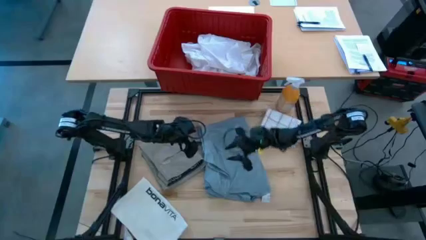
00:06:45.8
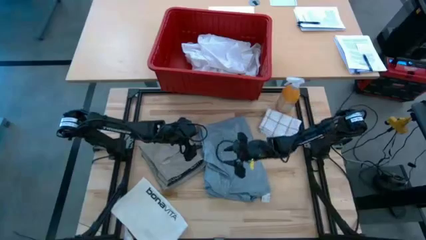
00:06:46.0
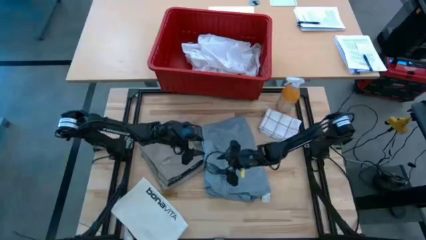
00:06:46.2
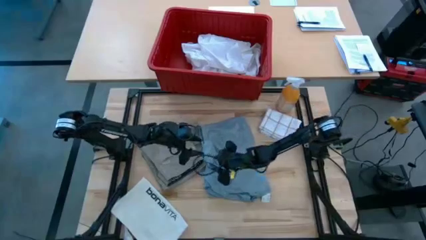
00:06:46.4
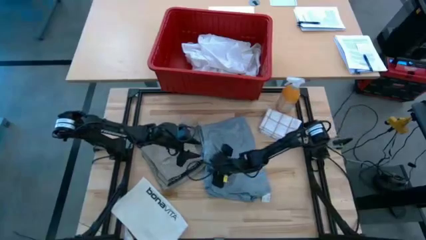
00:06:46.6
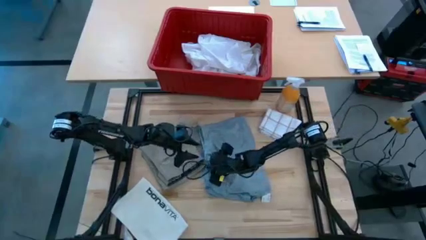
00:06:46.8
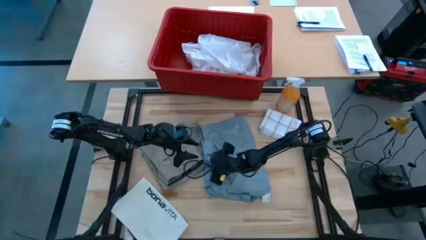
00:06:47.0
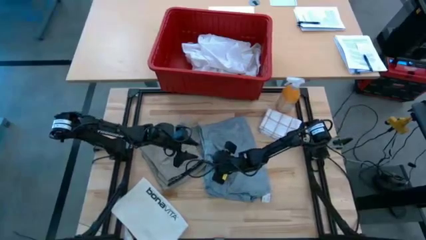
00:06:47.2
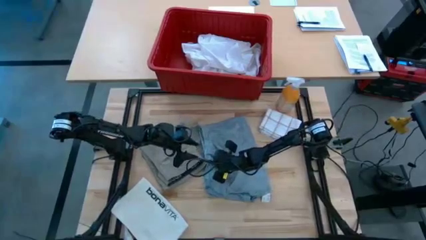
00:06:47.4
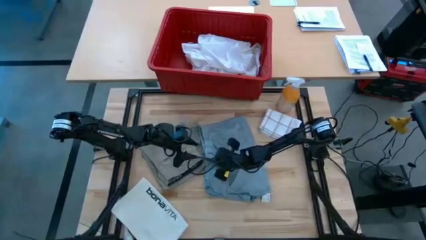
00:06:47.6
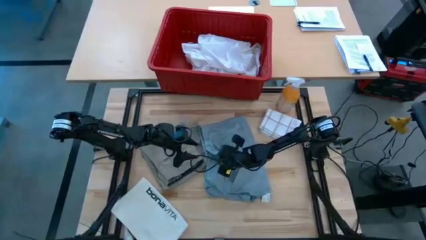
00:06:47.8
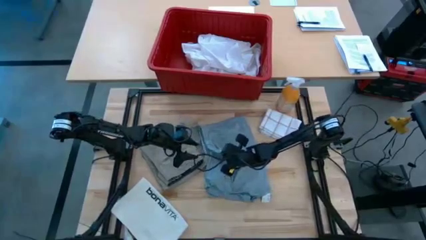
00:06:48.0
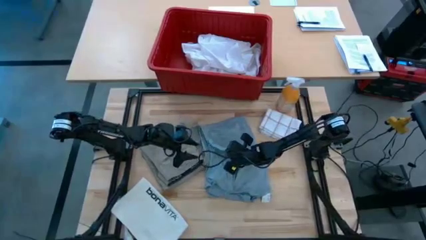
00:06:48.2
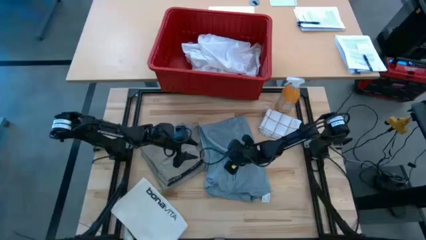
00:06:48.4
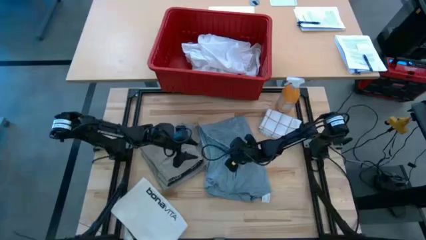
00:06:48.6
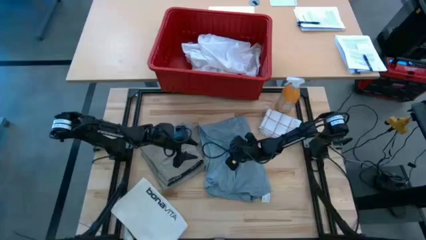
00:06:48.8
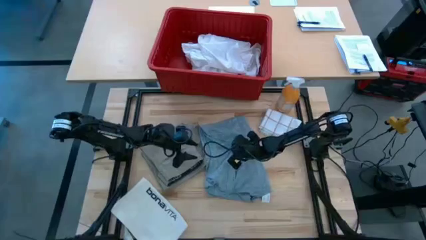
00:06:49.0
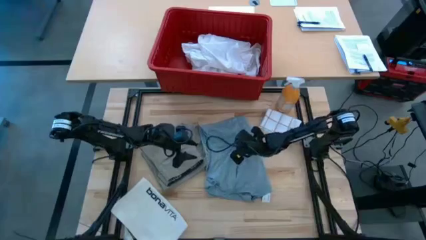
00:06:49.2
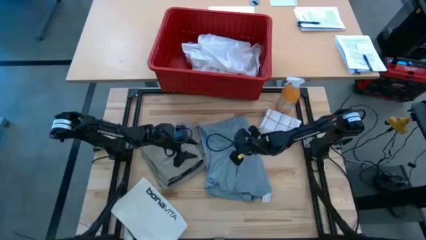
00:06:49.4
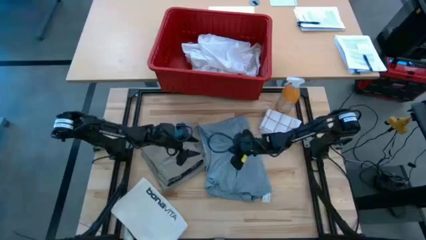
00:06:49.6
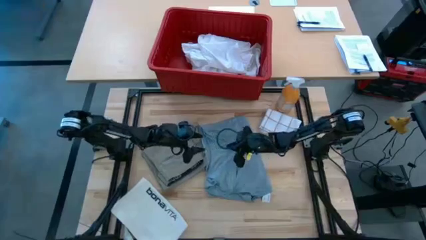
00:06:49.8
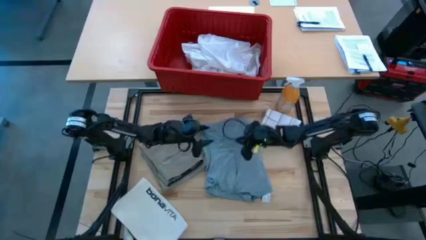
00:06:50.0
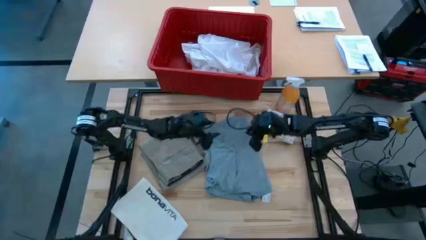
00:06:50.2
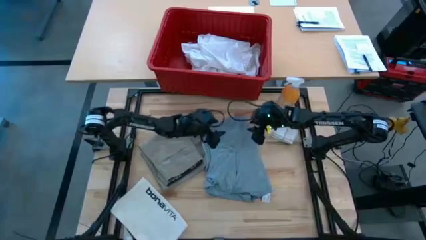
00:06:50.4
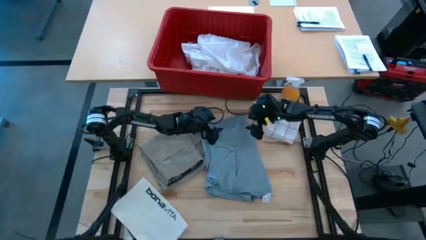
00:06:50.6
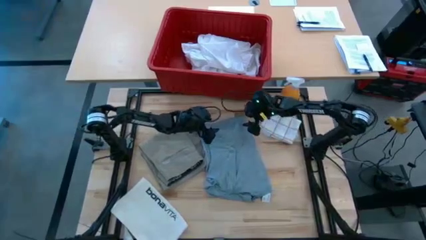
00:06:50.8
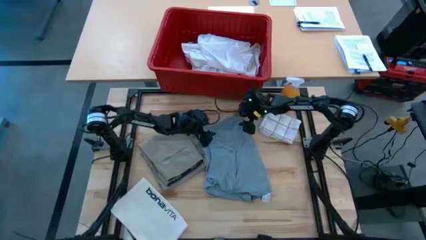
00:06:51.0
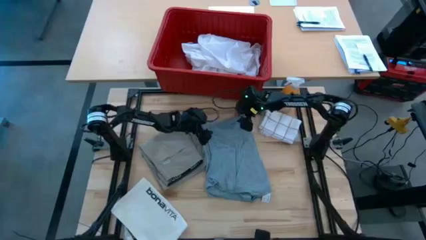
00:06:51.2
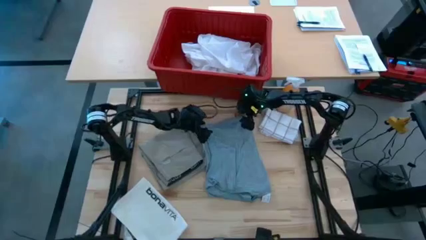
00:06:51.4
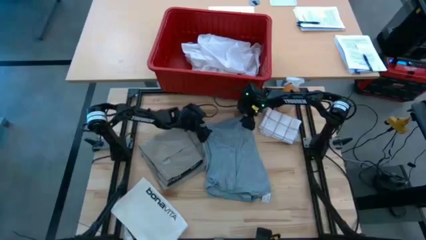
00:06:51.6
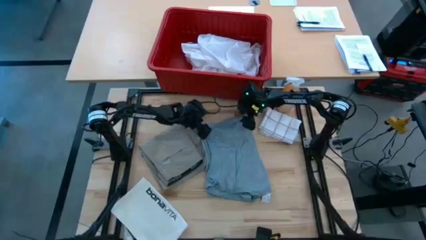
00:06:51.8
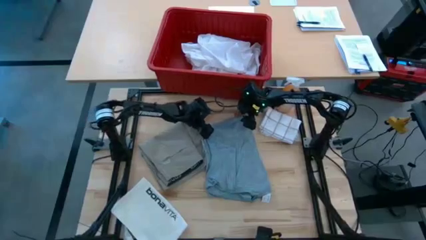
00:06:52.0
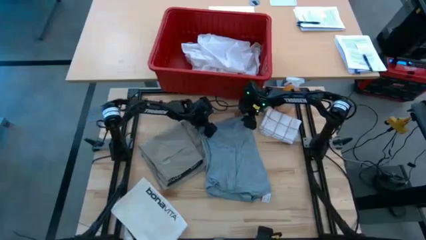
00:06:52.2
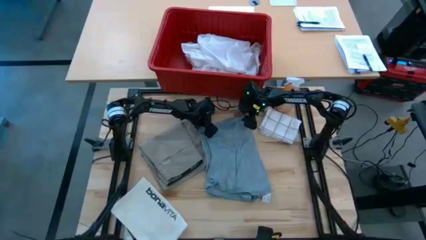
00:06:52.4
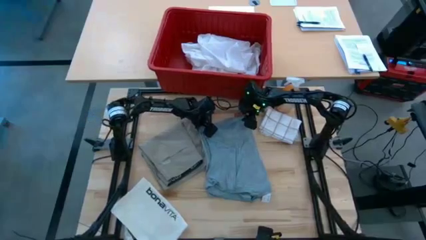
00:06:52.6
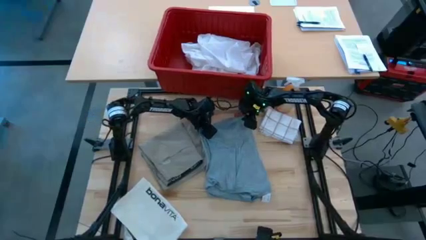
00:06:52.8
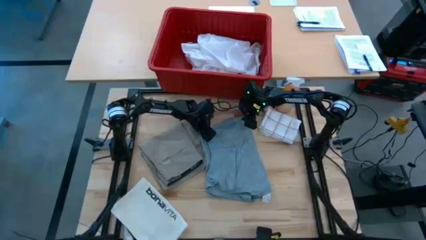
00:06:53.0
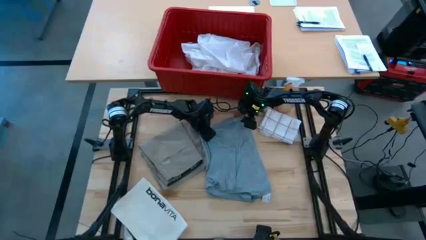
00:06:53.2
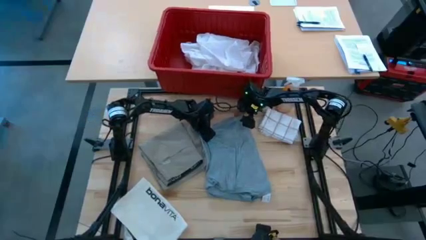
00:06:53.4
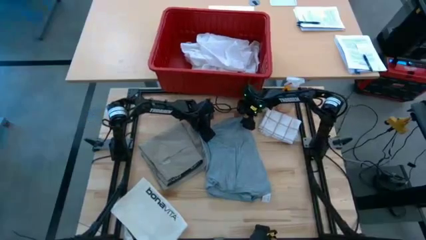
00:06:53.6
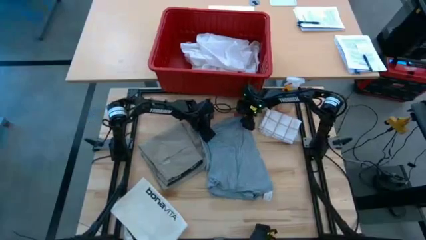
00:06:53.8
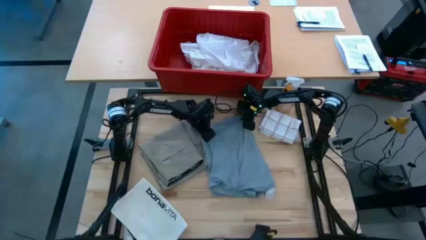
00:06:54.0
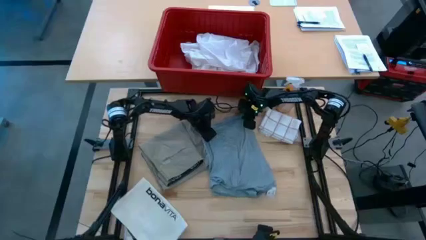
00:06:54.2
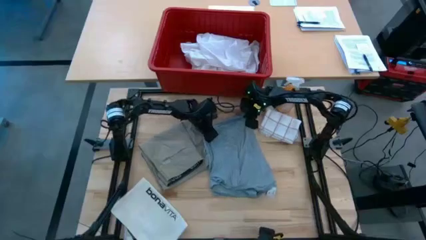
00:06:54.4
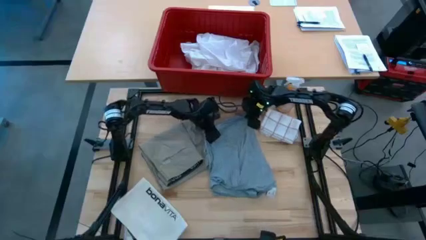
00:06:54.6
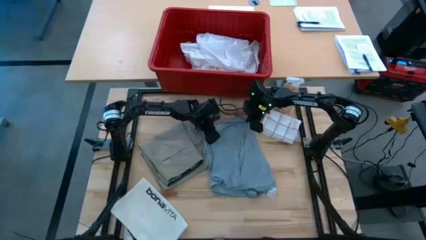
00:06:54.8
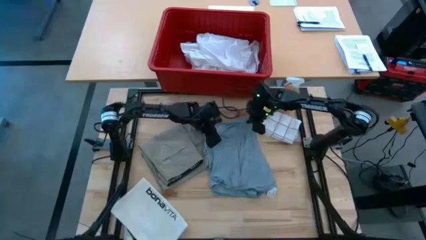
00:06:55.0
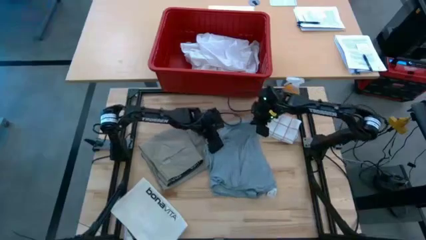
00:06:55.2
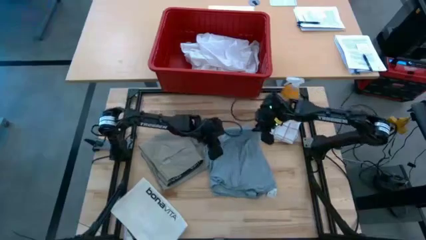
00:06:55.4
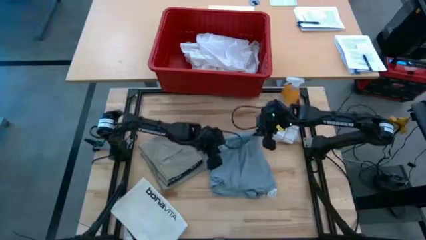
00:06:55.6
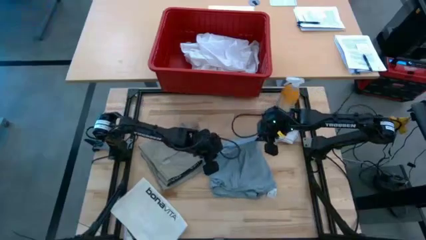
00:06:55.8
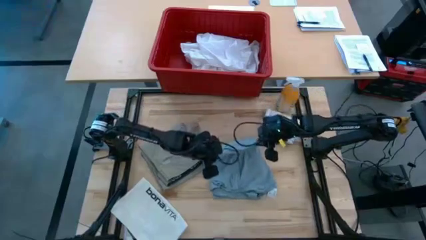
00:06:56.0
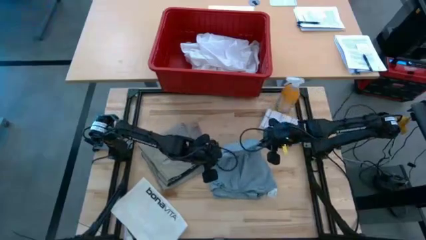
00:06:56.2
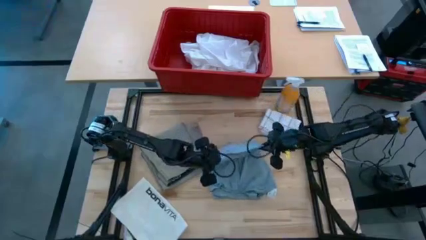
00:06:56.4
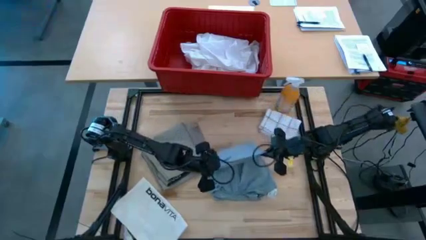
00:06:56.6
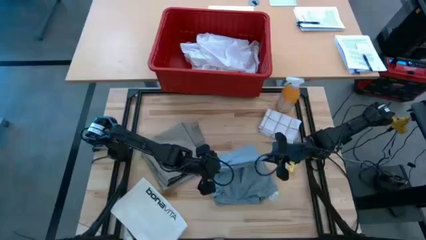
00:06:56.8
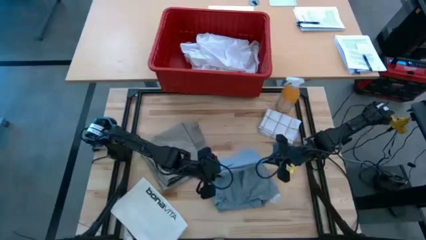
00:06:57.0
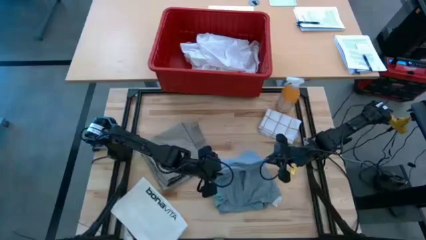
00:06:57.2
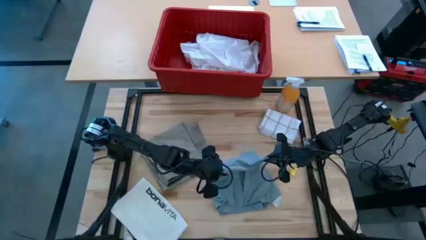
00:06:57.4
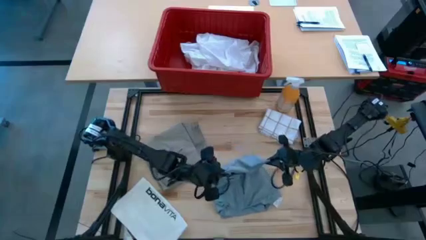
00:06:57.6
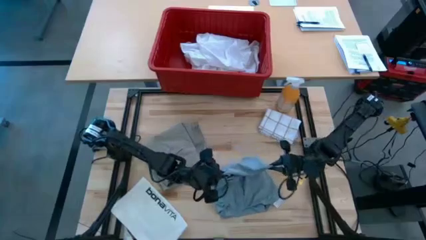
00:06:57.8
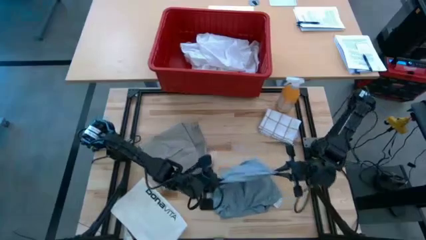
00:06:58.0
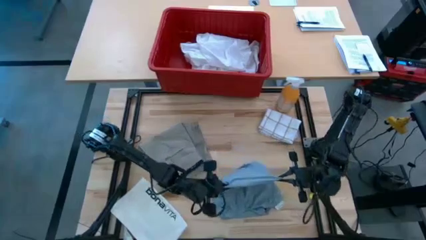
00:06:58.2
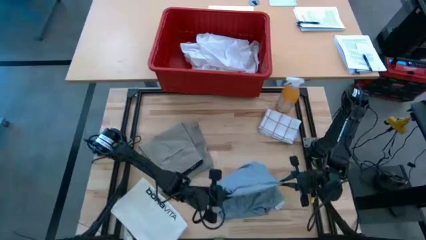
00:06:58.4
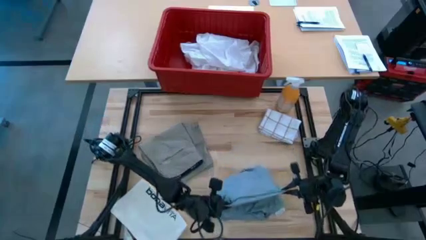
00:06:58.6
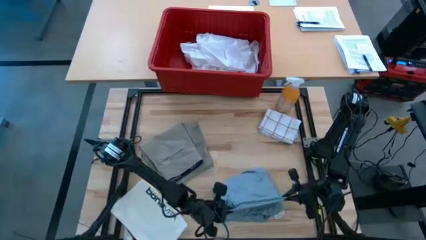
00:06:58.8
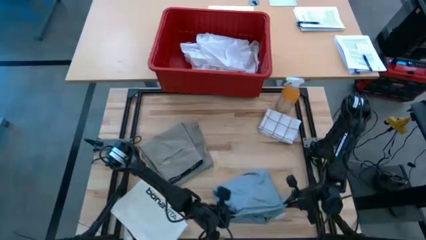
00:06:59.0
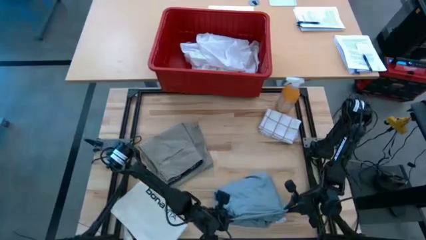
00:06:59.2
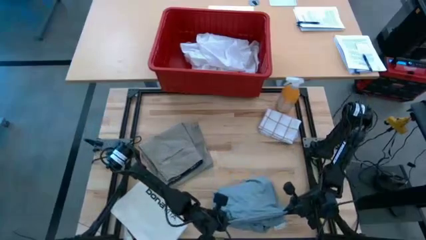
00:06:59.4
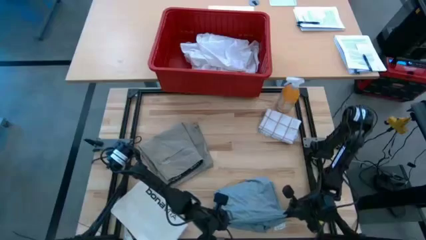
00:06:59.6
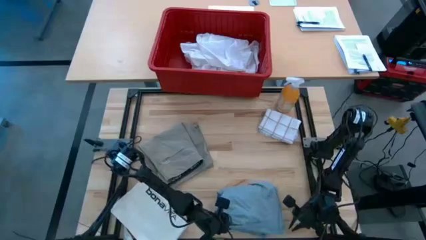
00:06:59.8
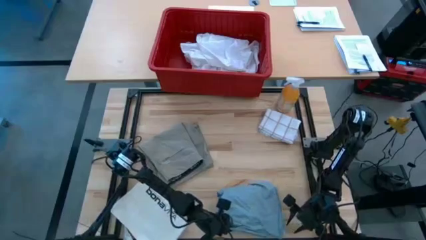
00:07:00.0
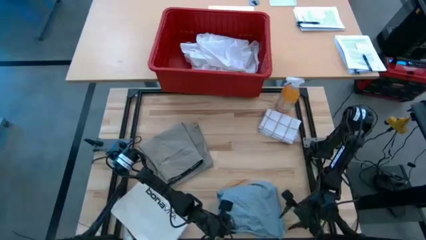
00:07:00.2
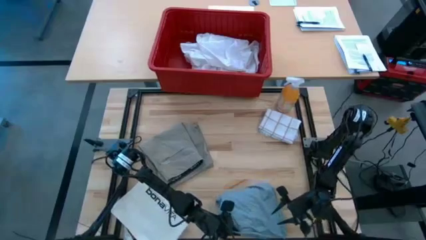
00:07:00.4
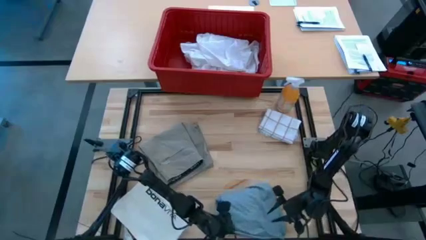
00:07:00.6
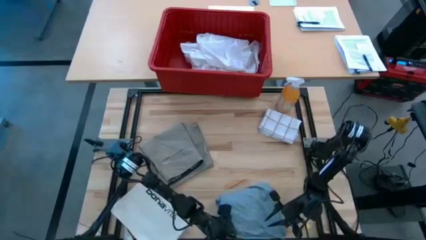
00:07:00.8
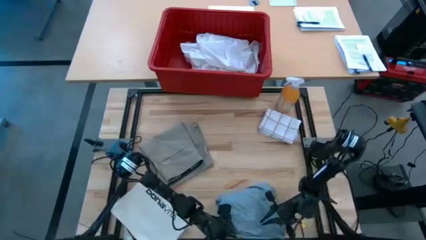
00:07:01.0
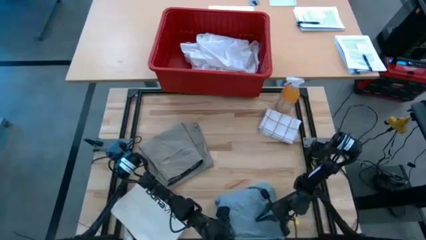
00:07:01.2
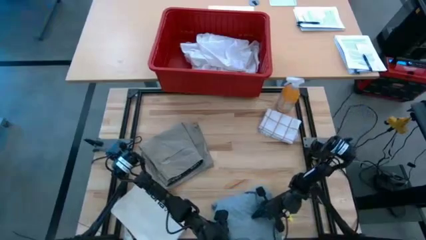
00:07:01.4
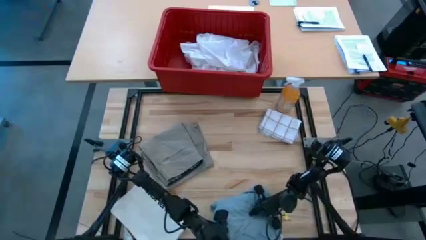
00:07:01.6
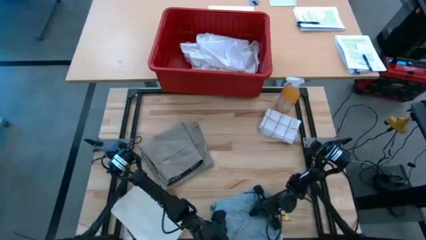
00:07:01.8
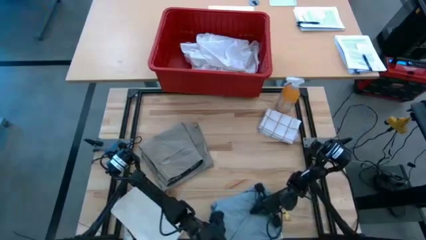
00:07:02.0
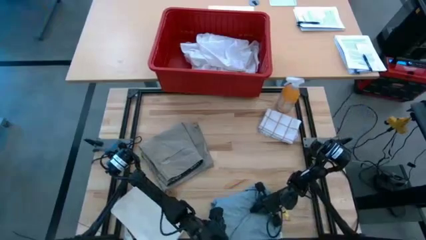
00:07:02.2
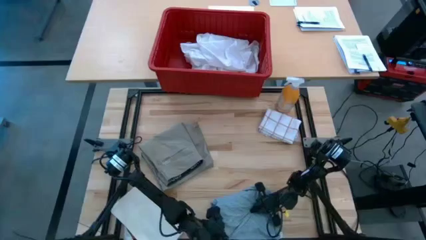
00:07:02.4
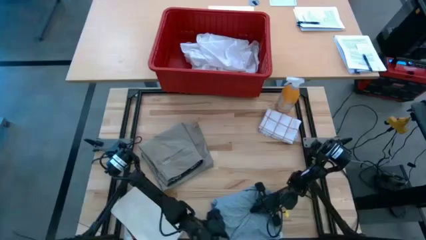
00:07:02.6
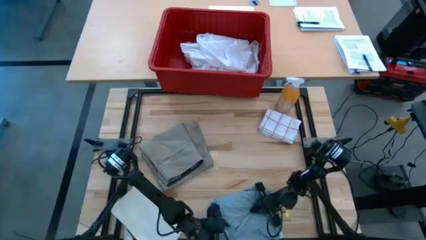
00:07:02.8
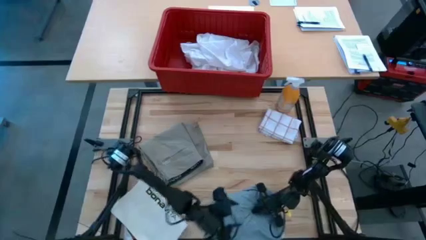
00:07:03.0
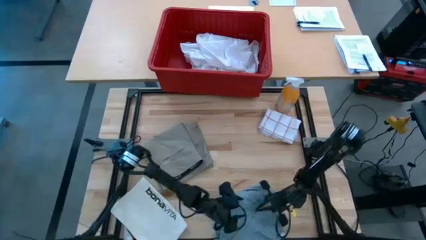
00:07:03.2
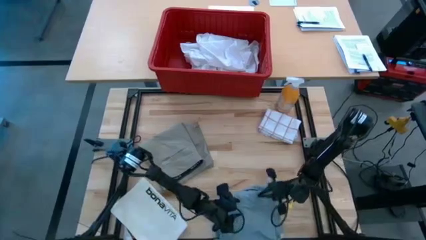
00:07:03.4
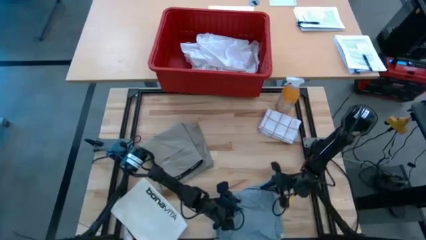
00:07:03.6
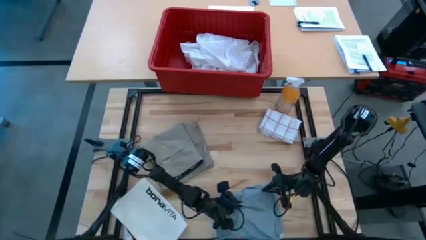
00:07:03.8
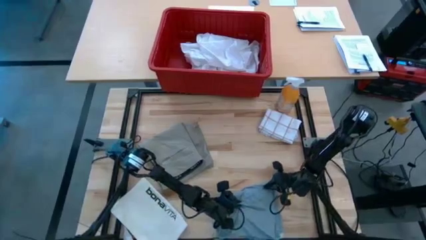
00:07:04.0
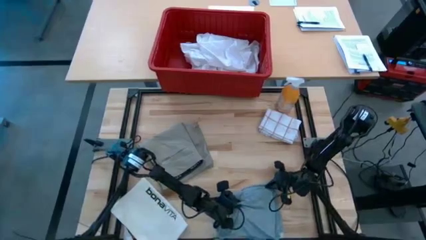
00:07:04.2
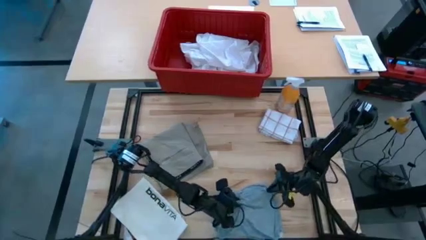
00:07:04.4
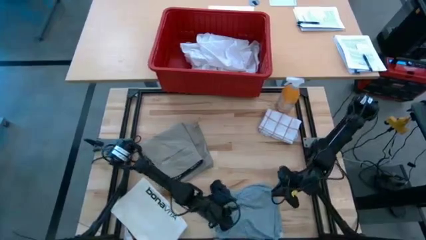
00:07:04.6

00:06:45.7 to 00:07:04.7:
Task: Fold laundry
Fold the gray shirt
